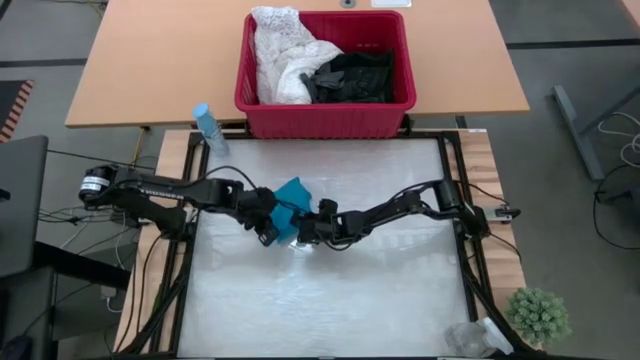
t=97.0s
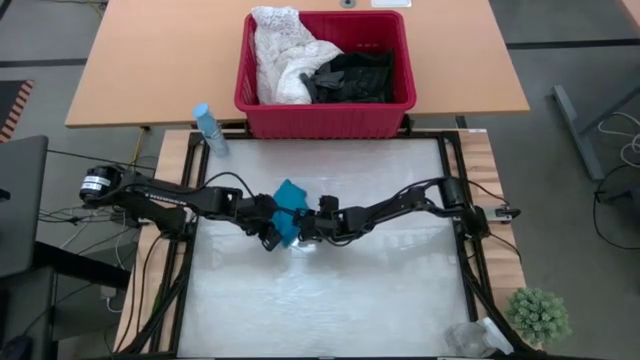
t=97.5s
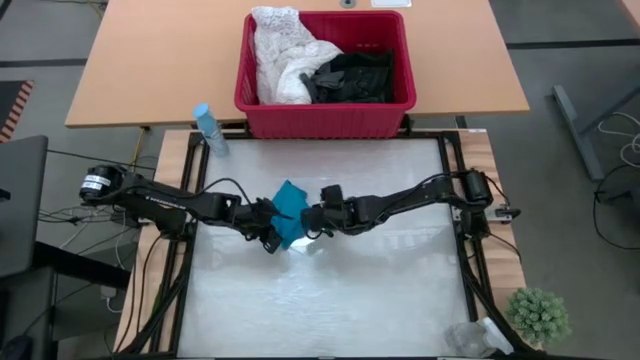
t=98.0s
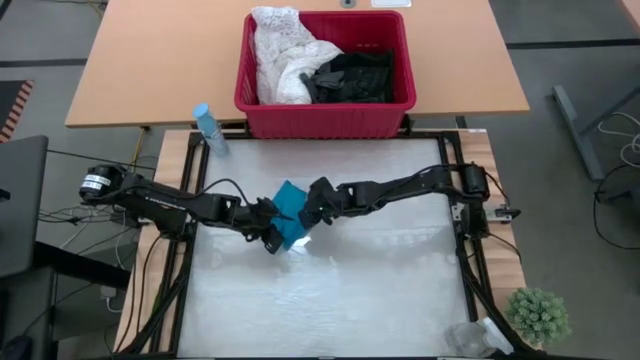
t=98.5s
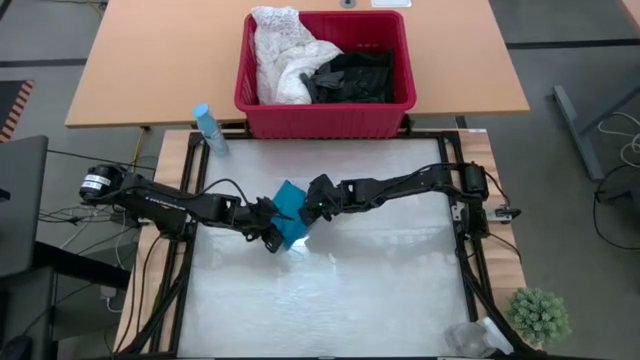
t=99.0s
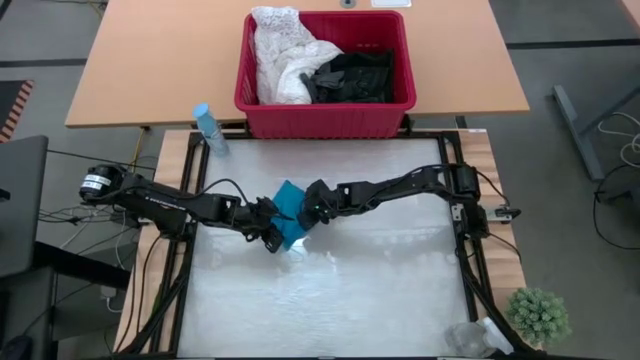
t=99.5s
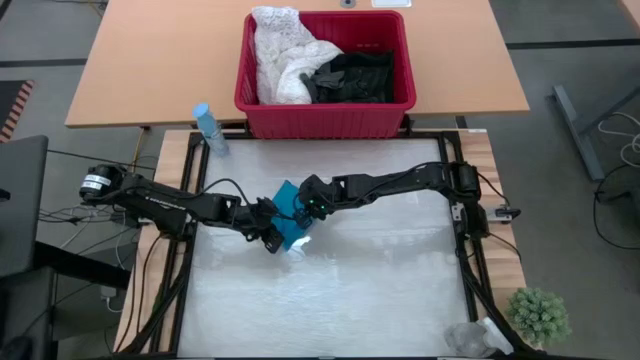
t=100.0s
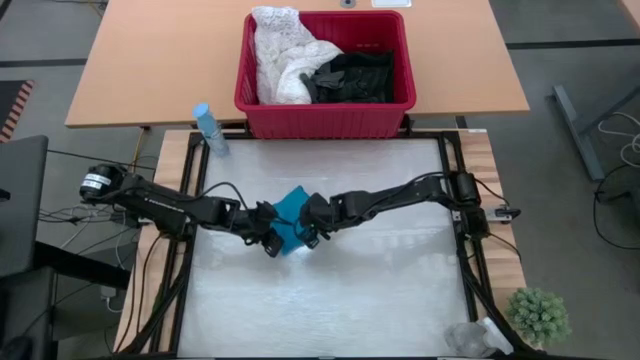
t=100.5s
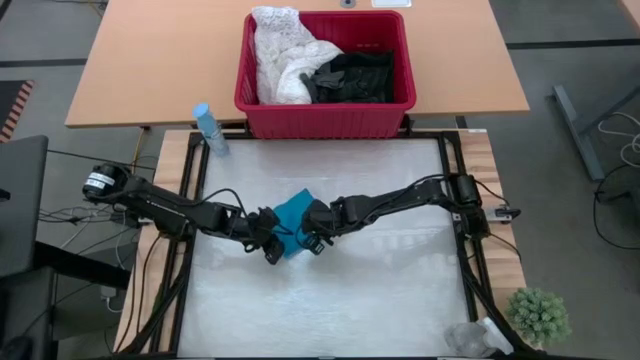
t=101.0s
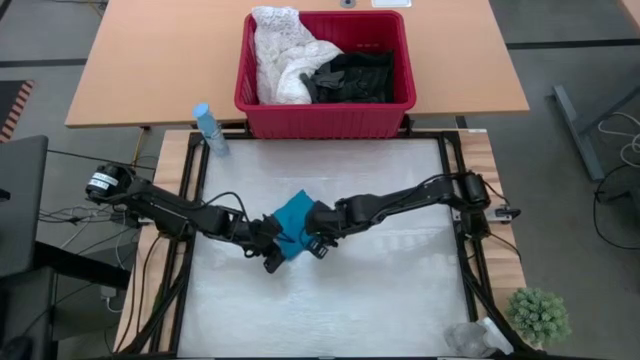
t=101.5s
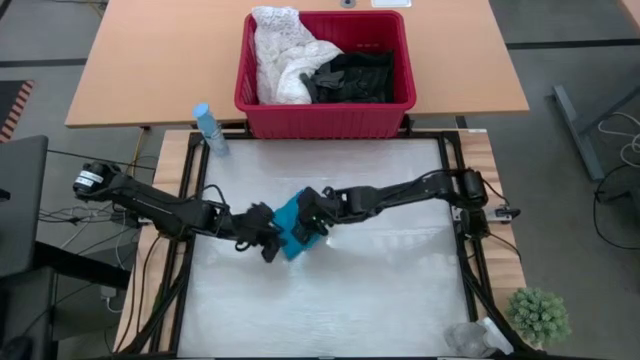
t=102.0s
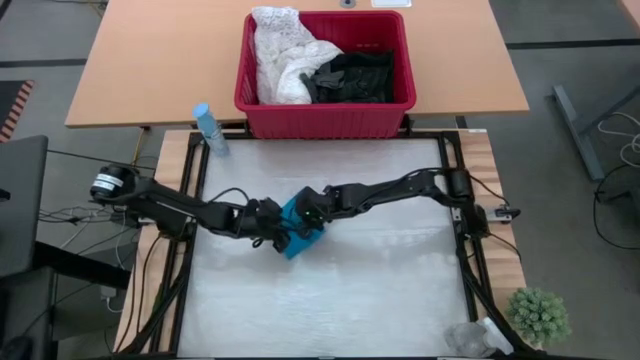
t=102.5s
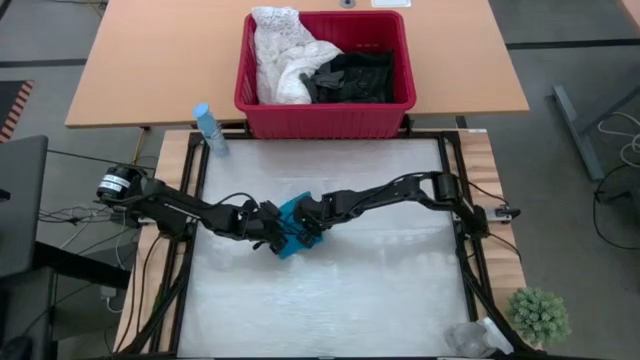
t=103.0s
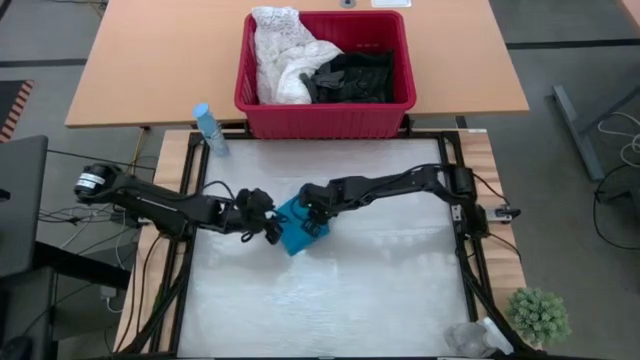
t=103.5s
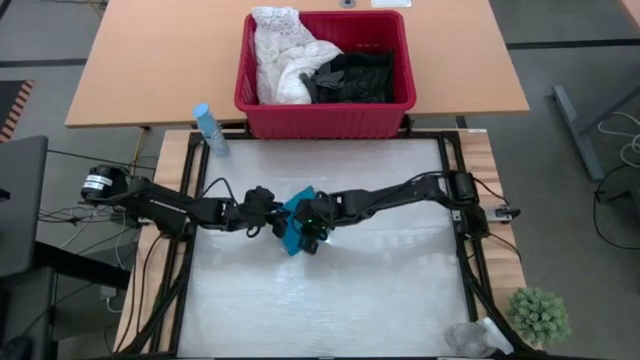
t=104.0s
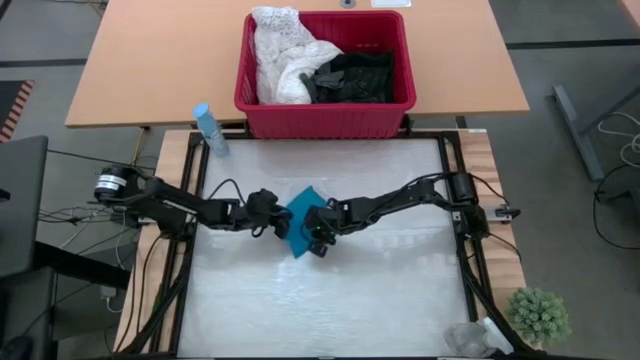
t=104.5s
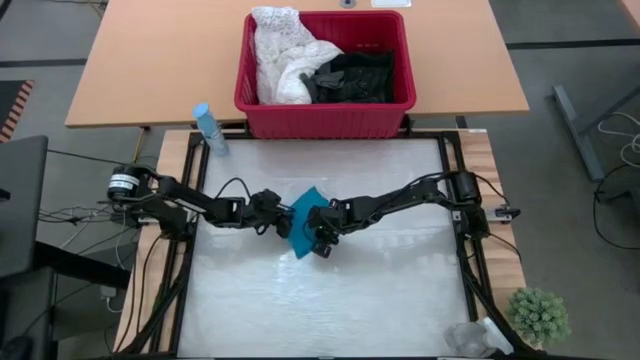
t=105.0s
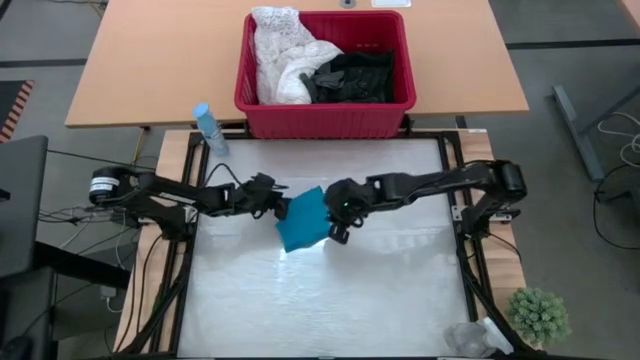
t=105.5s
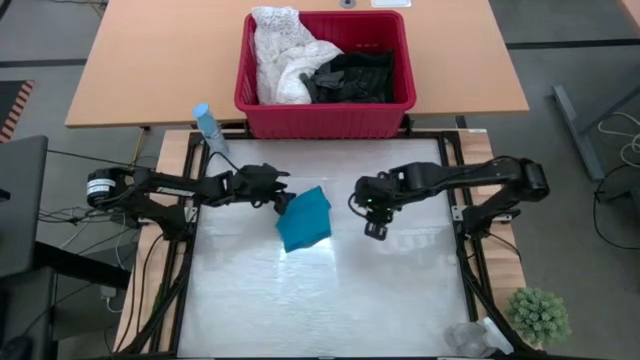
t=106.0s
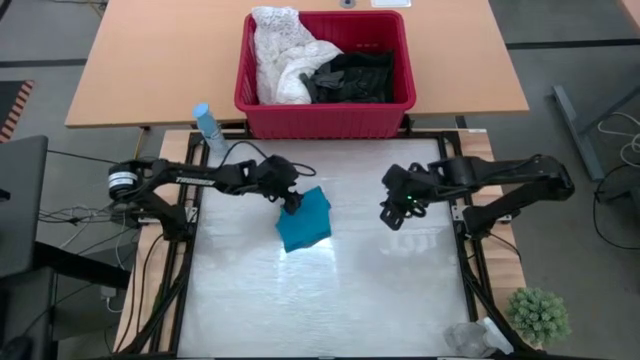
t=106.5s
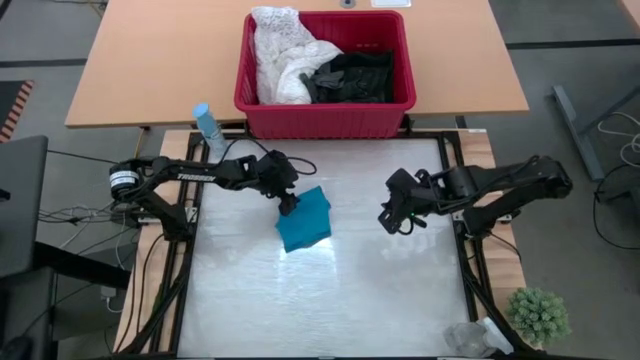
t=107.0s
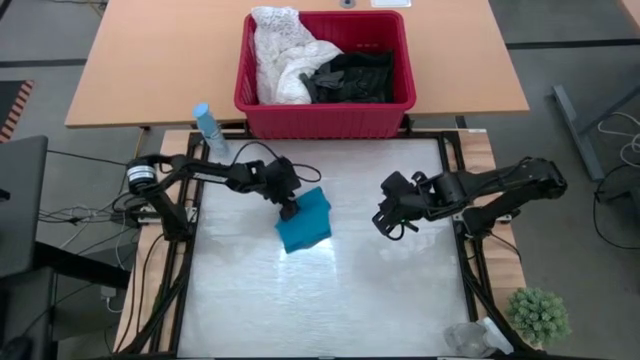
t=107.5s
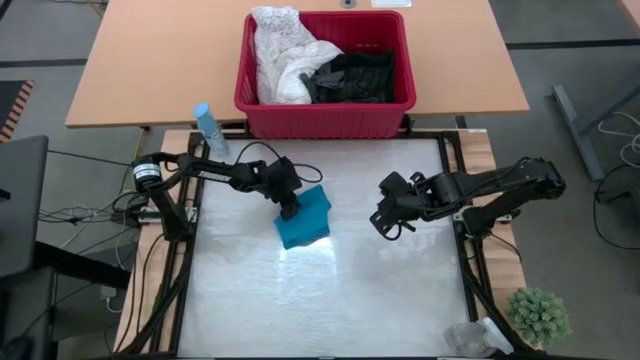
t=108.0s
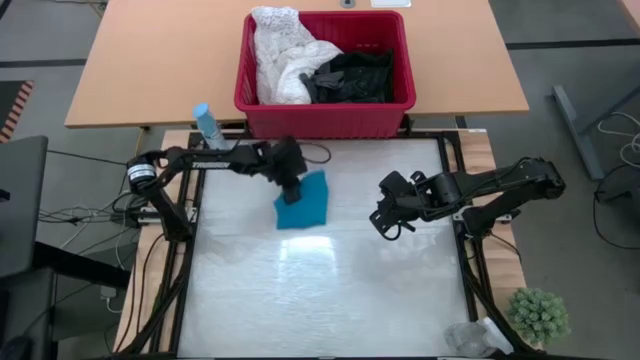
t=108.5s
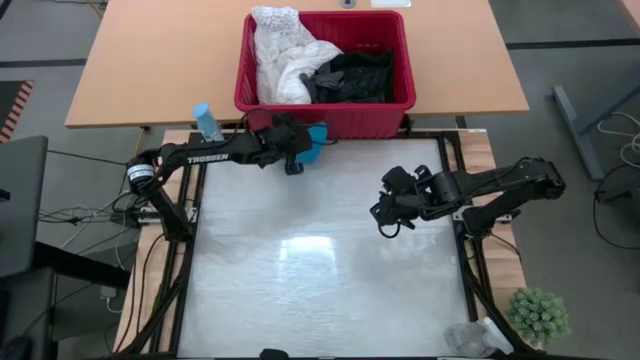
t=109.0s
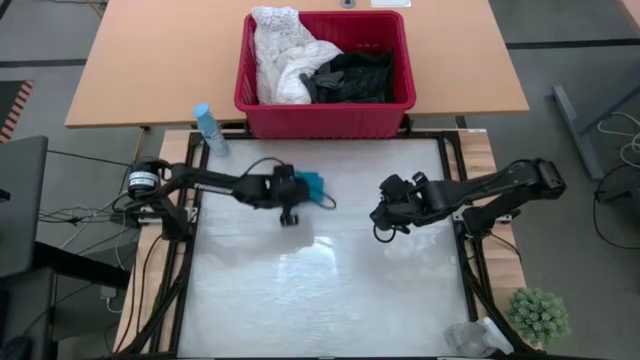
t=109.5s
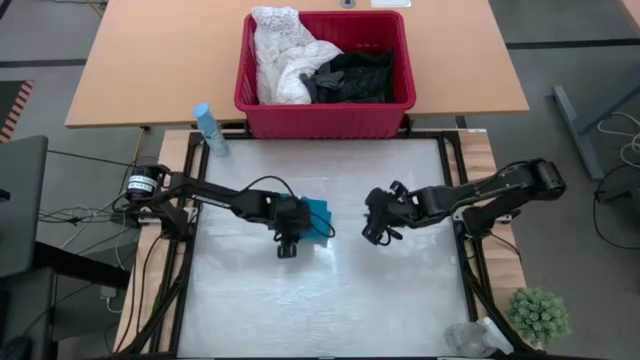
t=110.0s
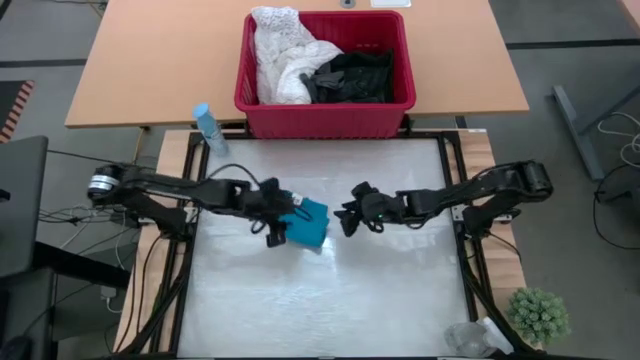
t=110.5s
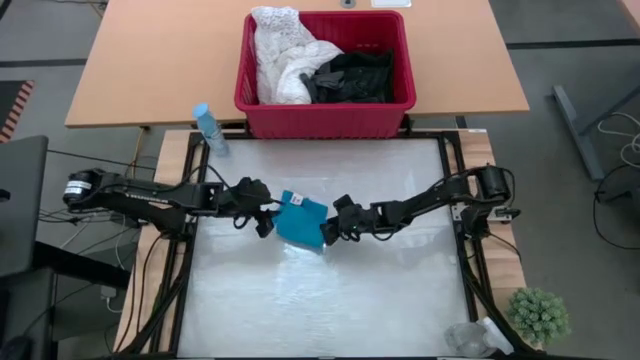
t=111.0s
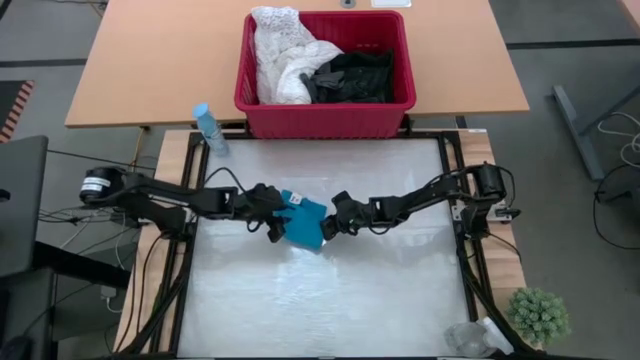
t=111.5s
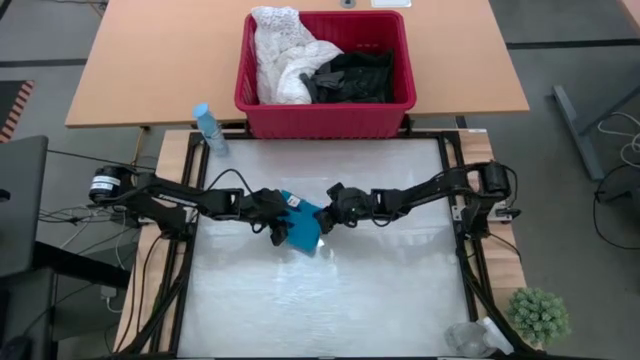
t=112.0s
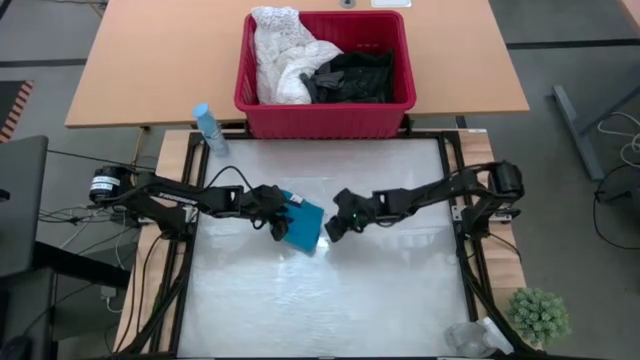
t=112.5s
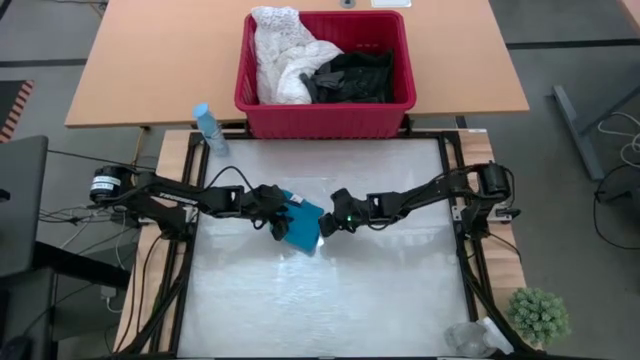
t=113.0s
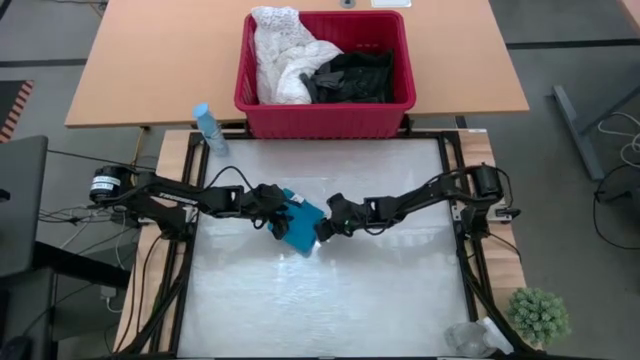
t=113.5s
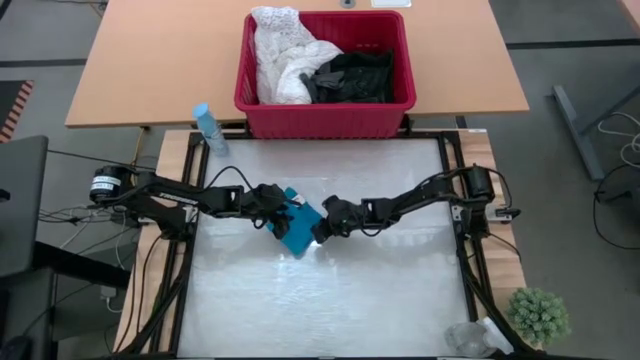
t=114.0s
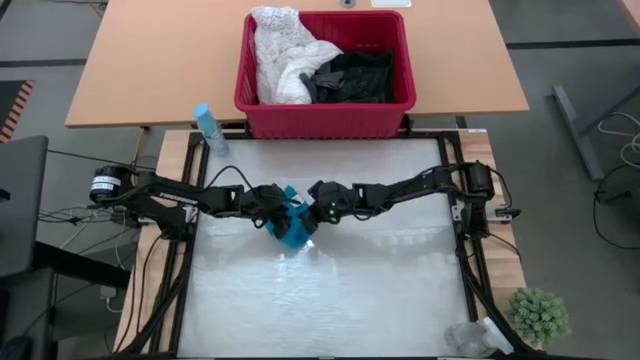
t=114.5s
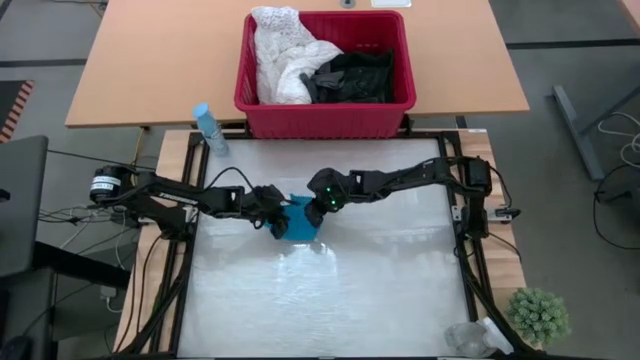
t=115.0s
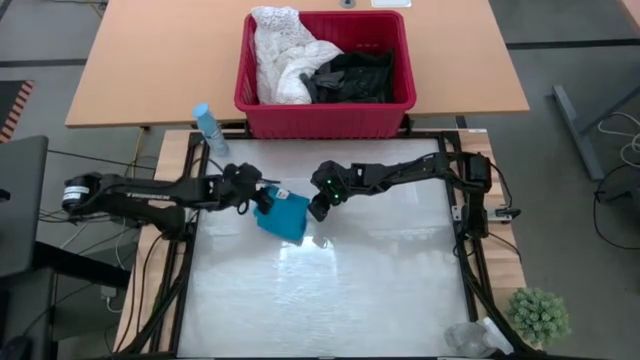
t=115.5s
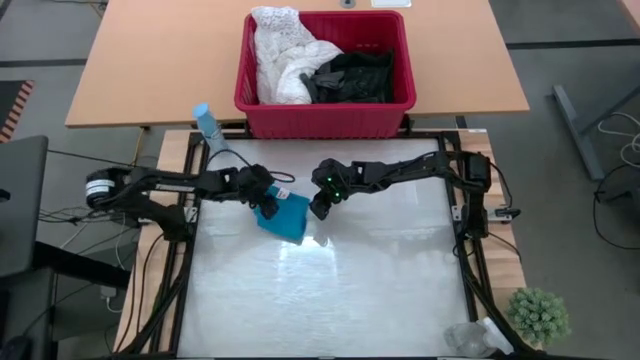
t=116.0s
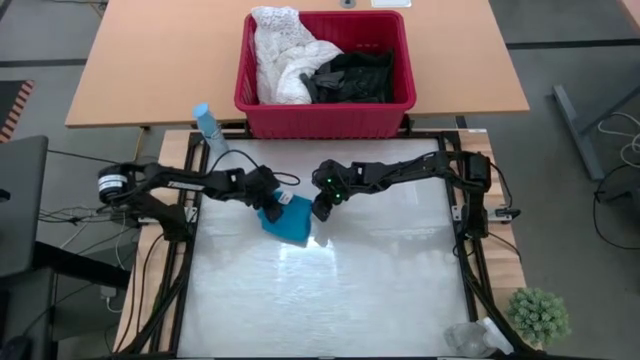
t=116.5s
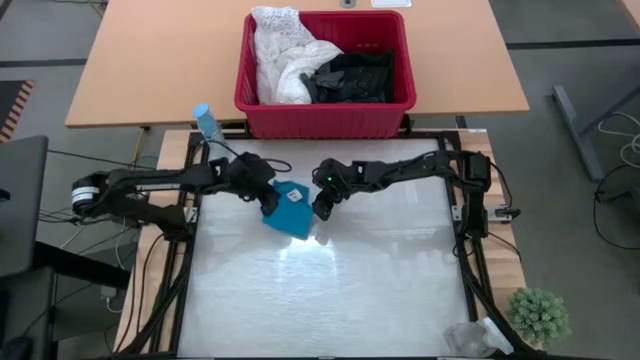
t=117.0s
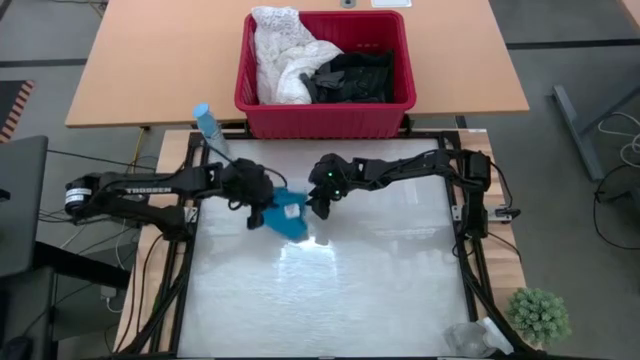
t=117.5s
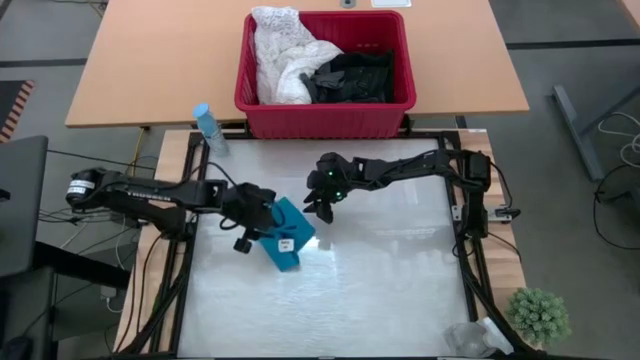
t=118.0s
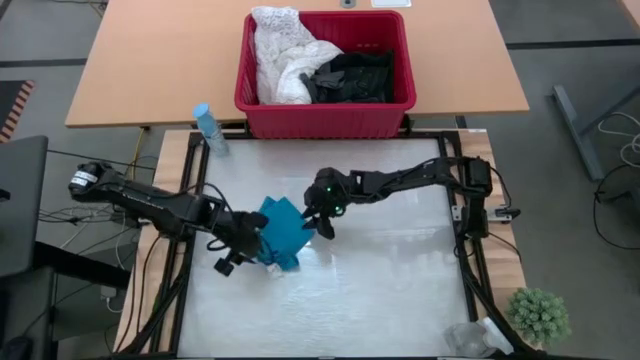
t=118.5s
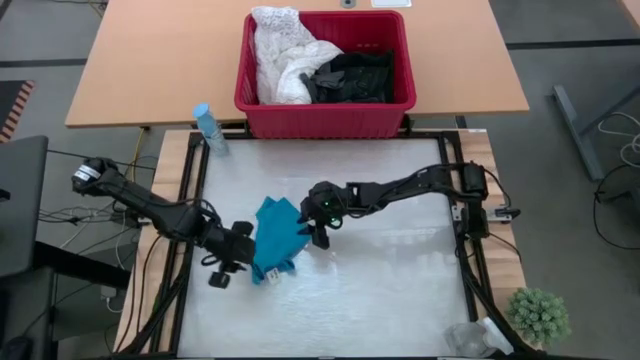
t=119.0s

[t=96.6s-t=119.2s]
Task: Fold laundry
Fold the blue shorts
